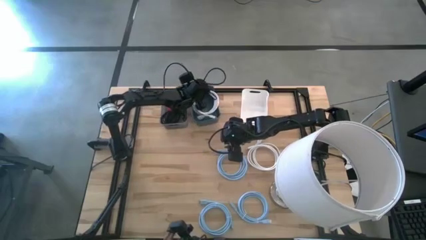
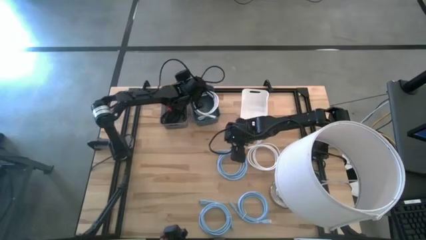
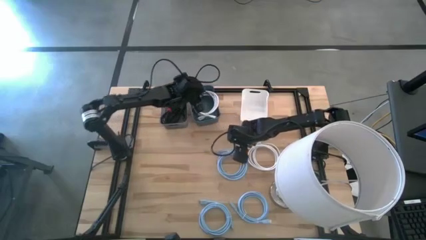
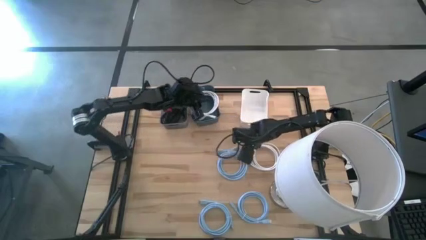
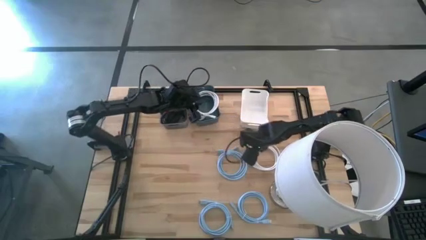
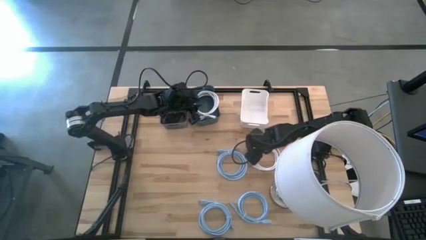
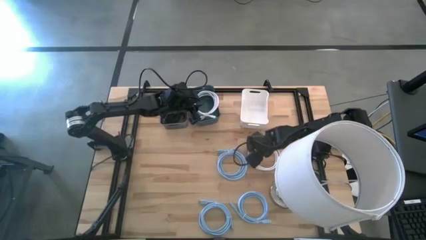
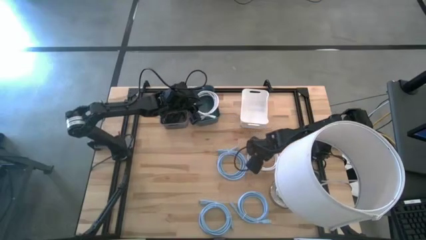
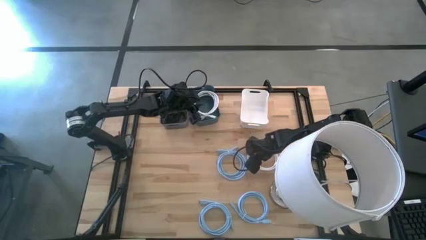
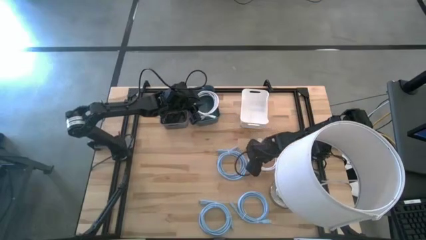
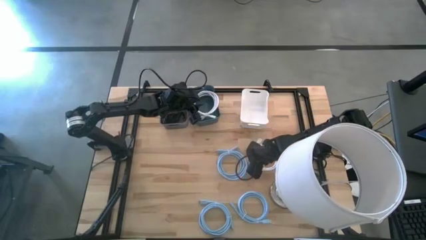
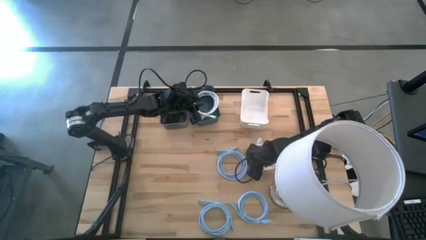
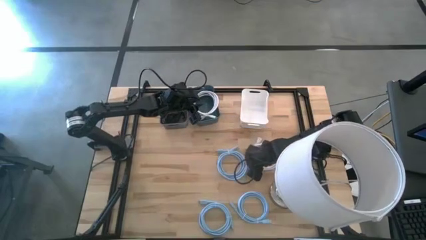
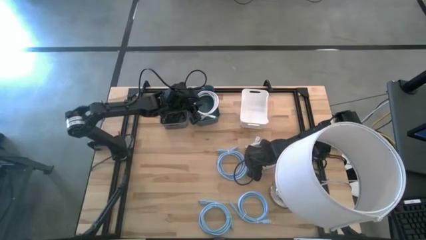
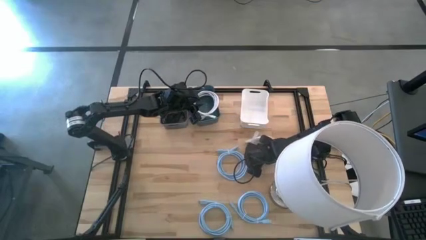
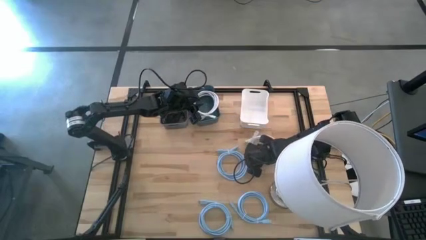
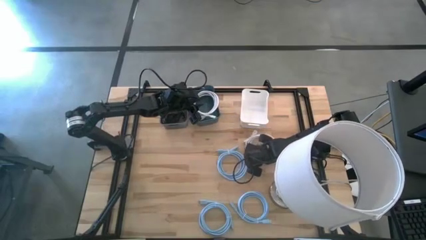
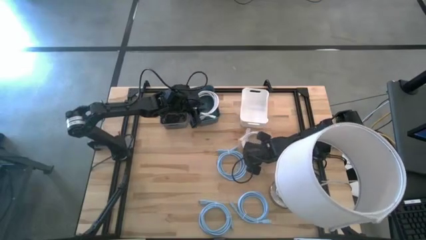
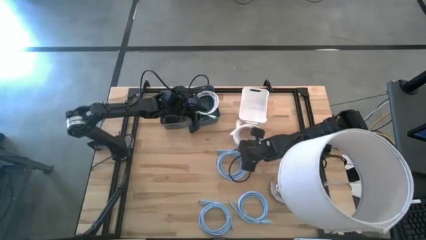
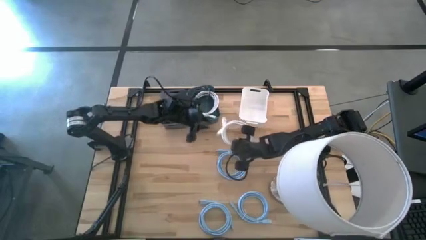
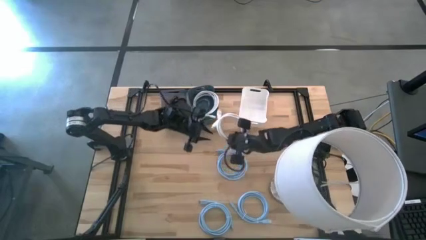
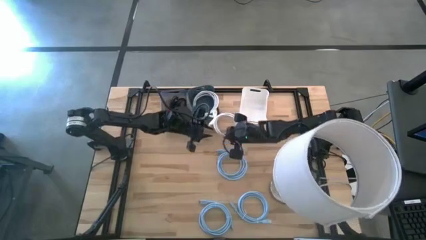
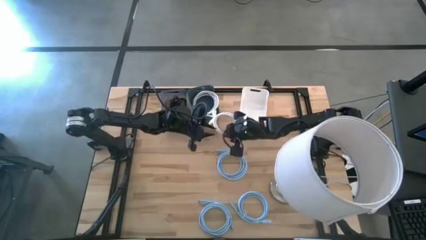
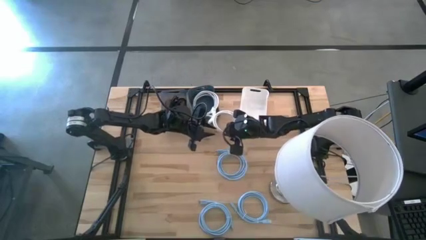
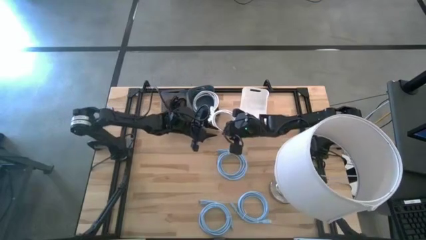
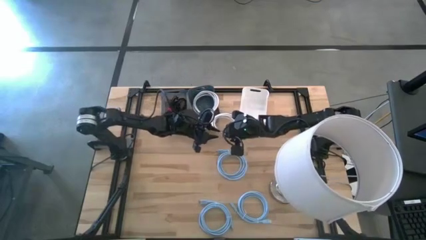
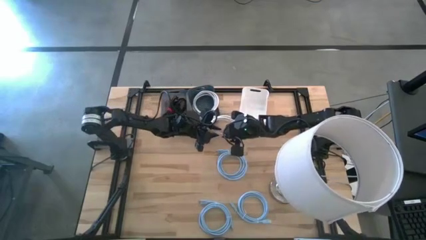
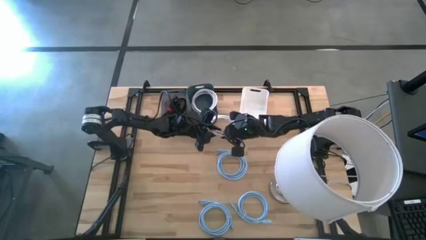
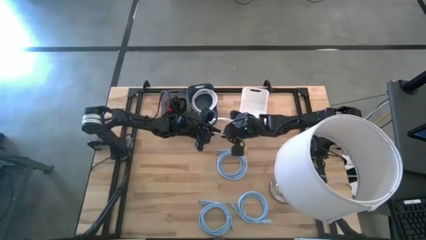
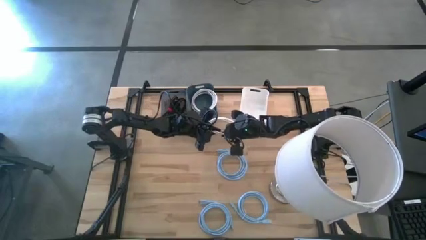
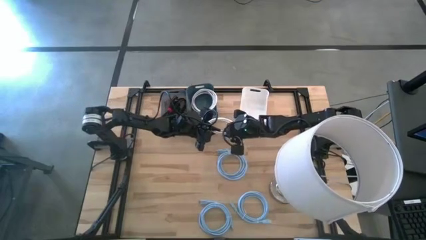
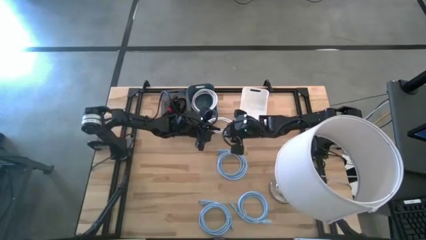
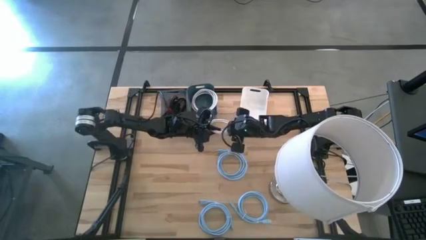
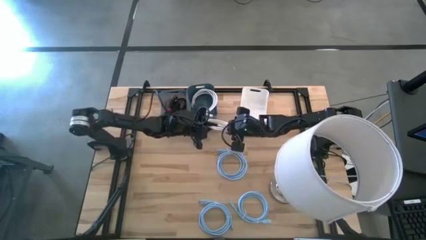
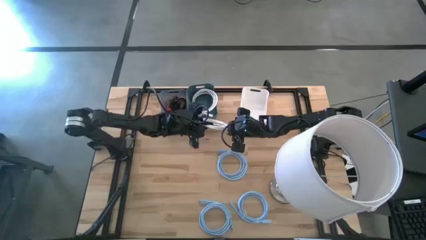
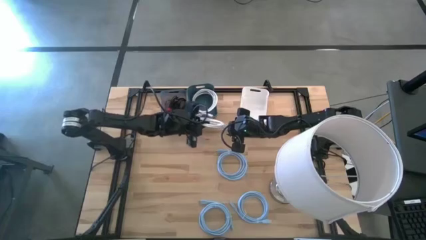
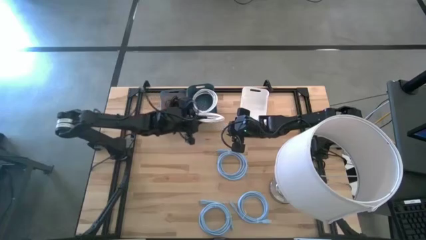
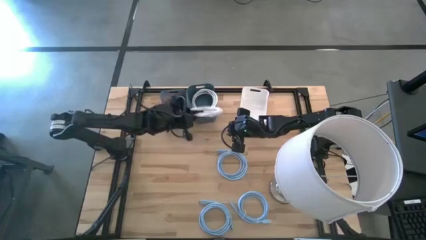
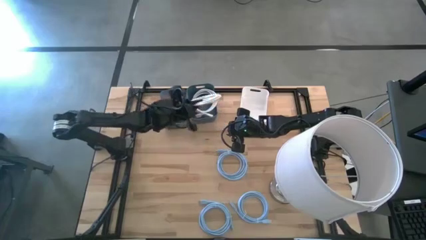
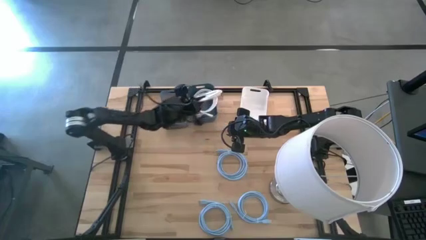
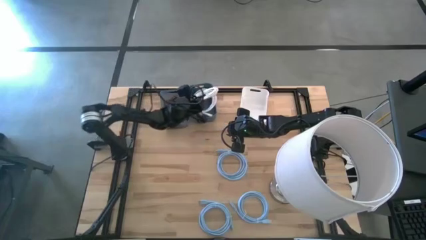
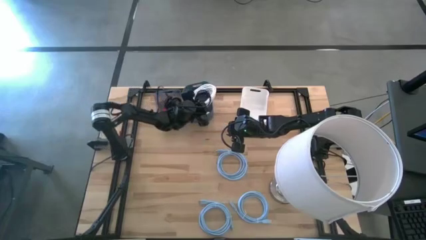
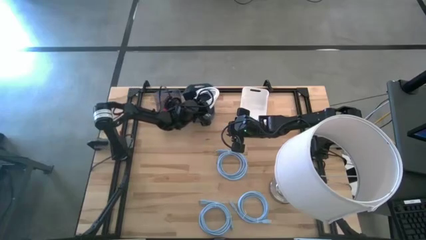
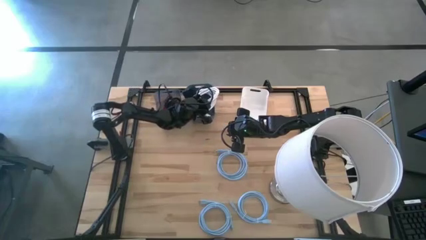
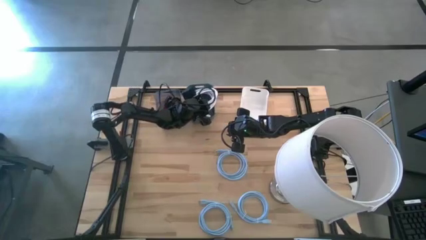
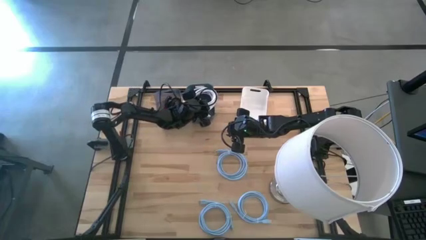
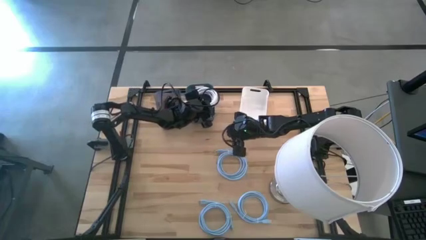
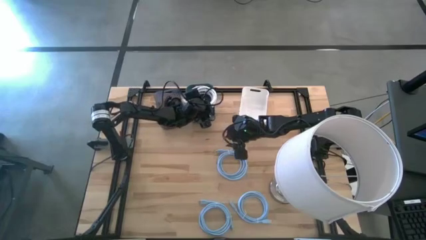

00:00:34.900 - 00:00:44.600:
Task: Sort HDMI cables
Put the white HDMI cable into the blue bin

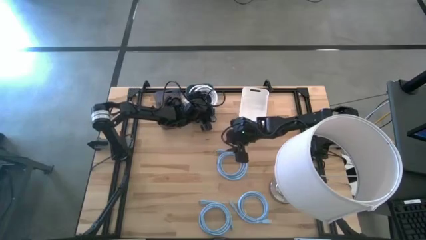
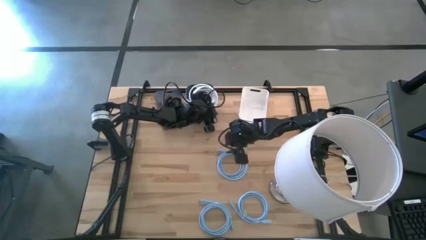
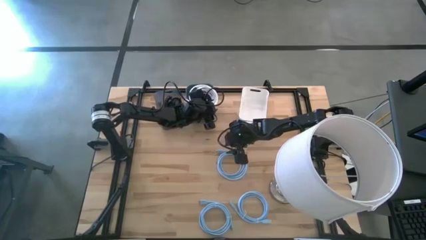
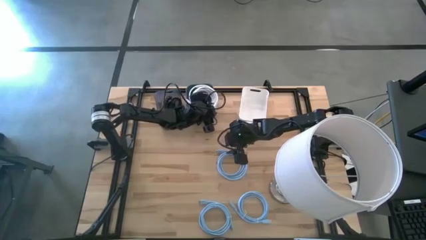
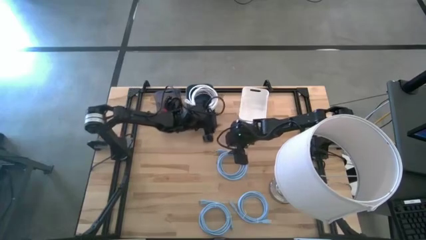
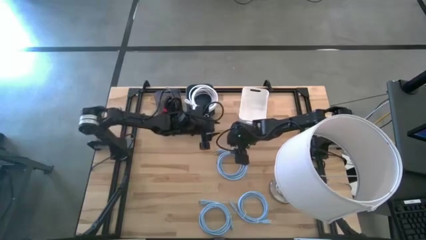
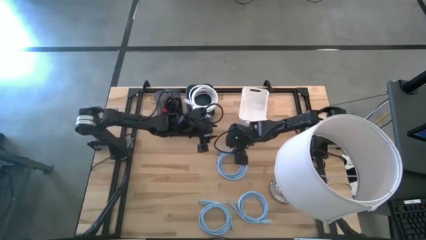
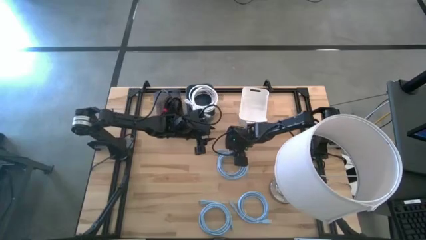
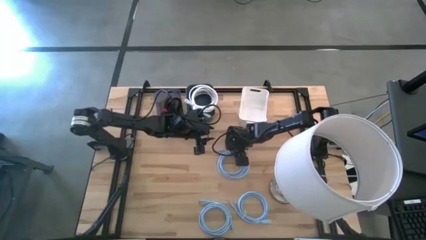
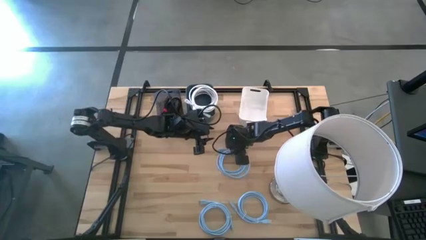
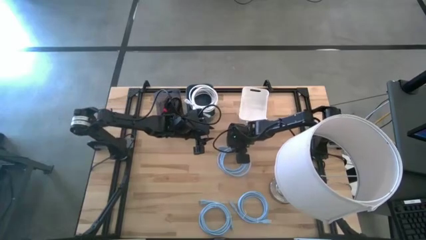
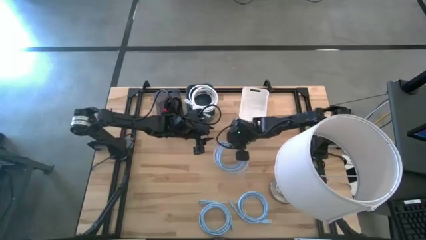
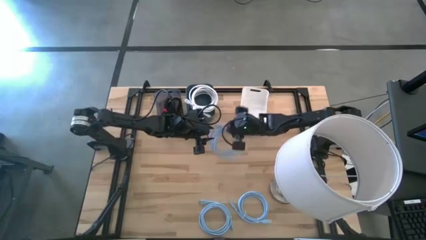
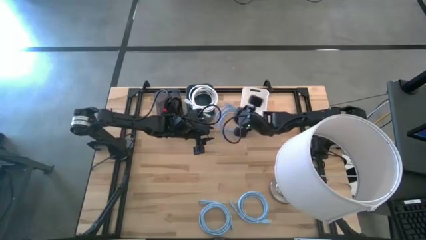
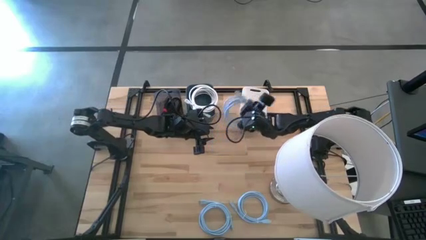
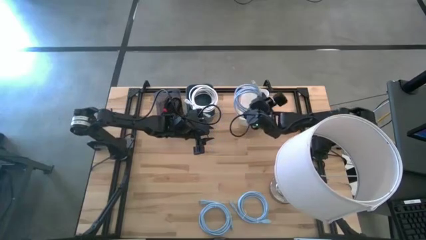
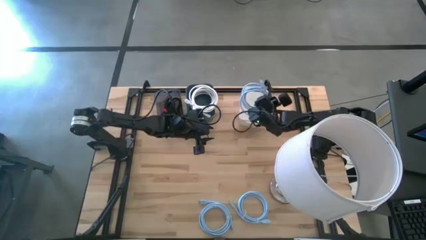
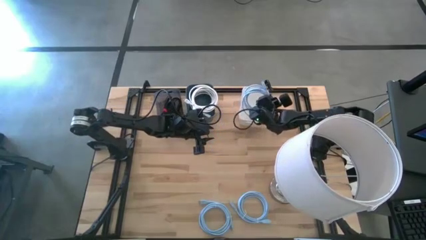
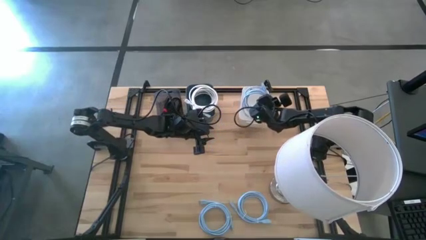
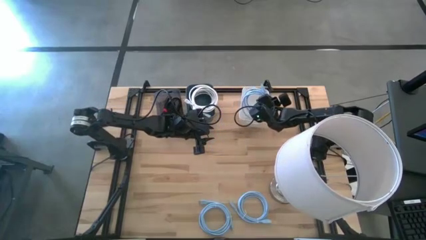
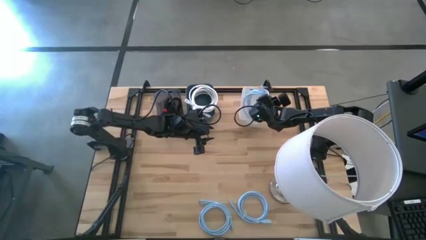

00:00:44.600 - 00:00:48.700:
Put the top light blue HDMI cable into the white bin

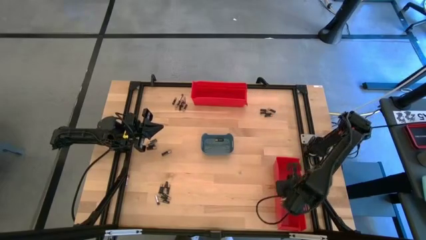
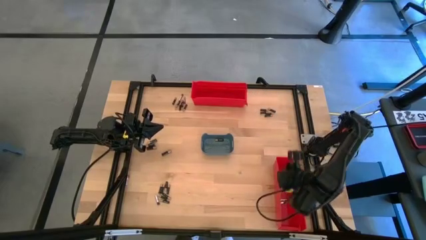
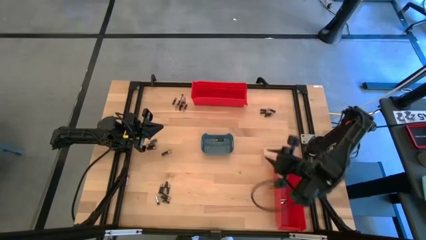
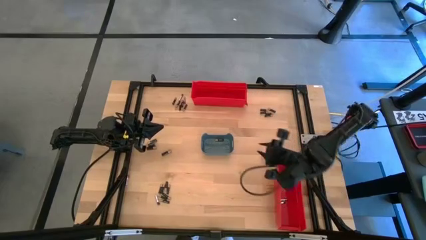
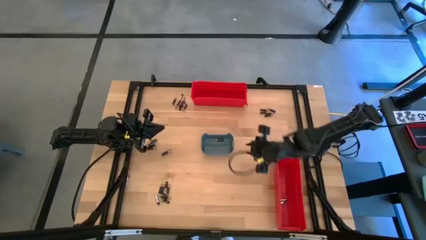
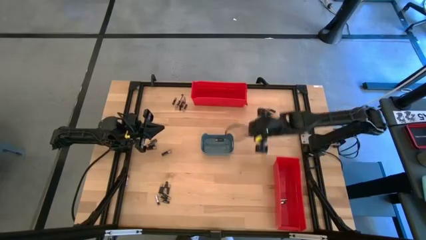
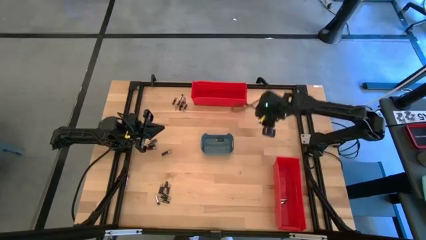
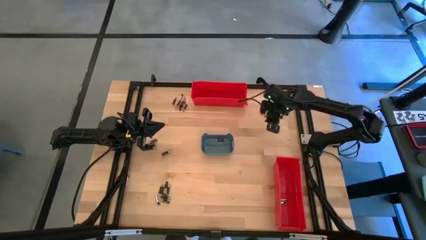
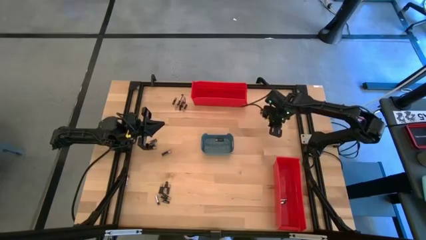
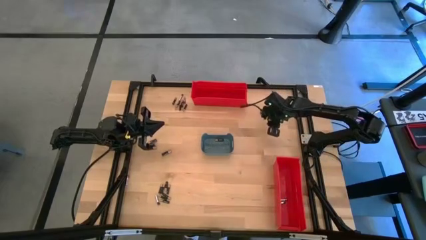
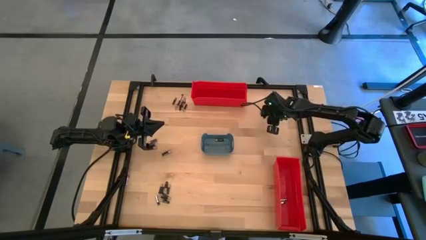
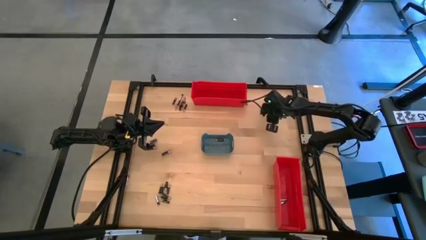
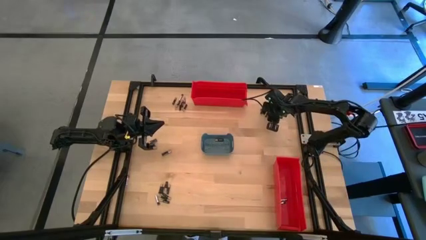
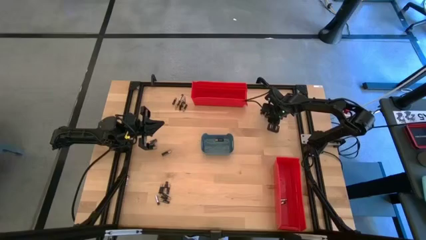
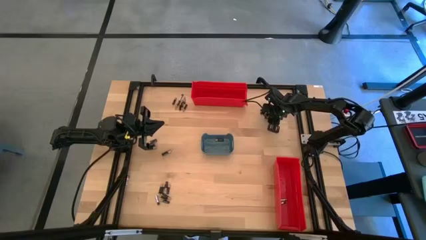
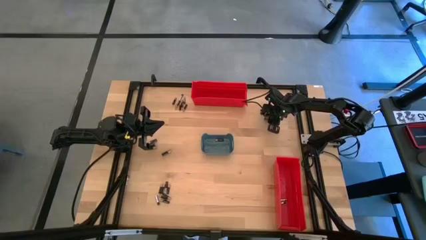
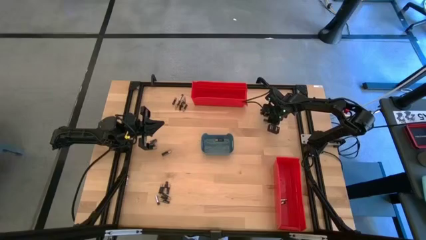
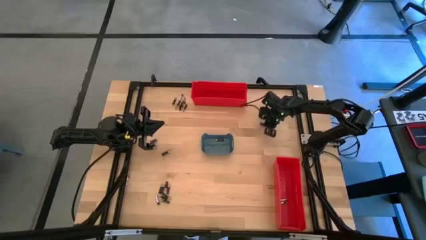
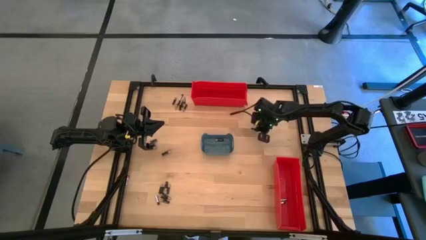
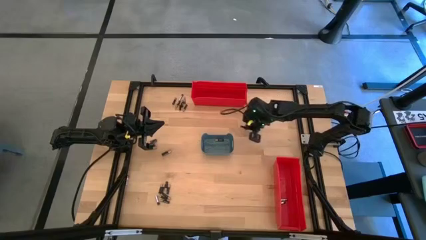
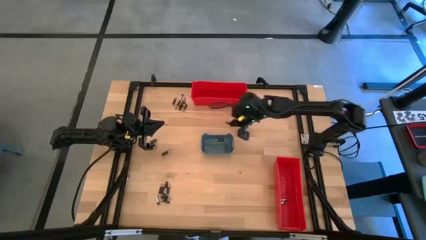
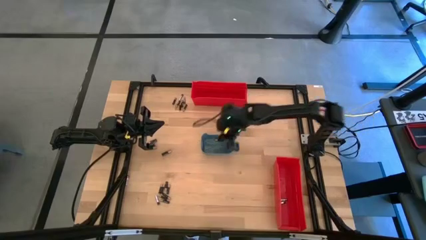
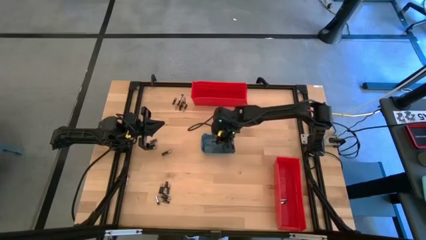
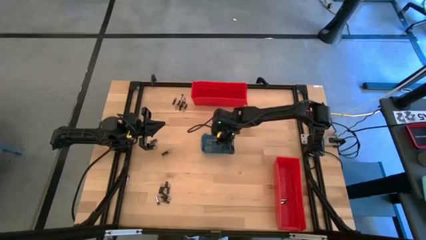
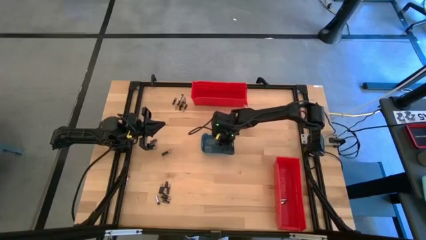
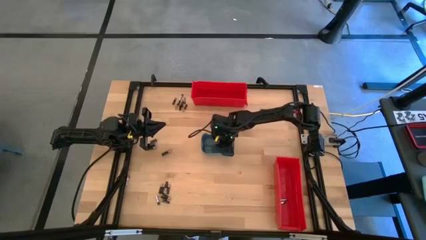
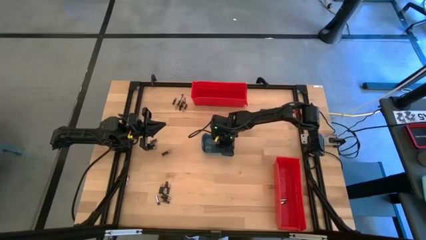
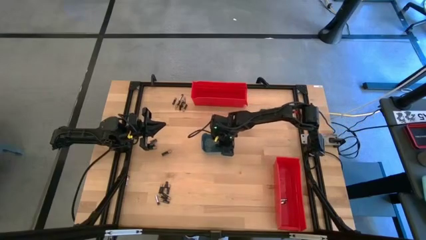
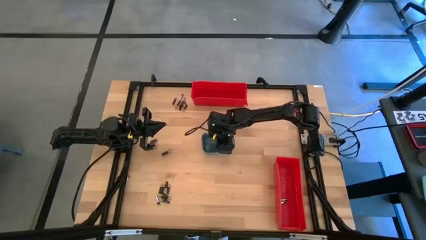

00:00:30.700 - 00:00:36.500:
Task: Sort batteries
Put the black battery into the blue bin
